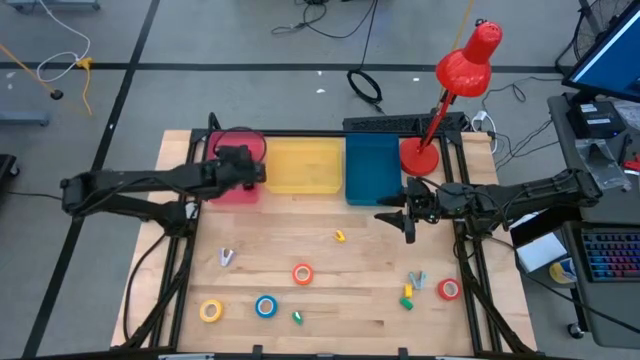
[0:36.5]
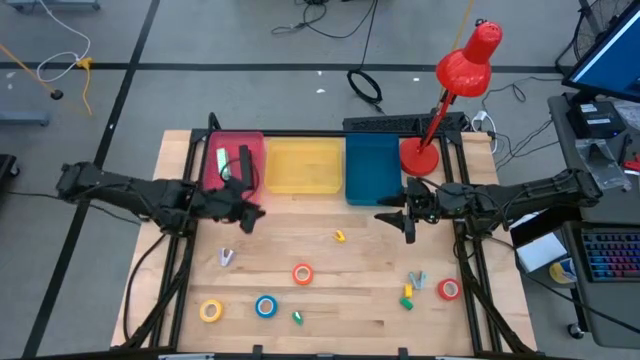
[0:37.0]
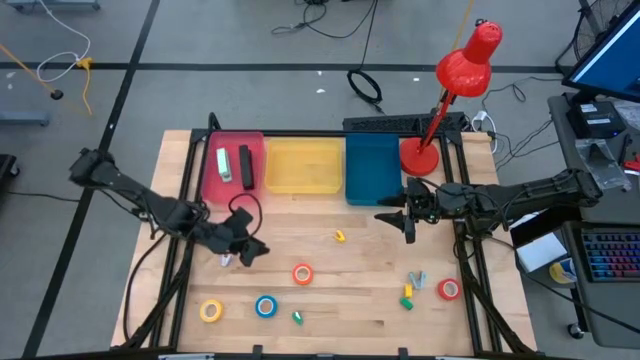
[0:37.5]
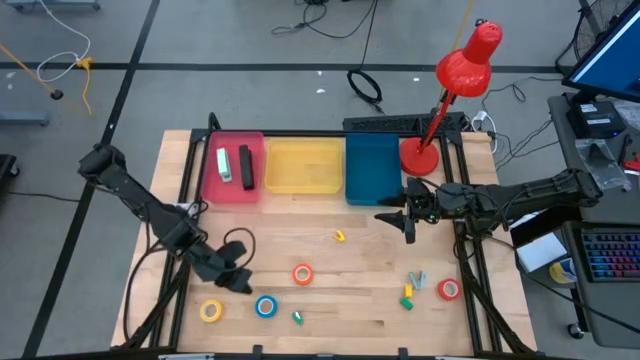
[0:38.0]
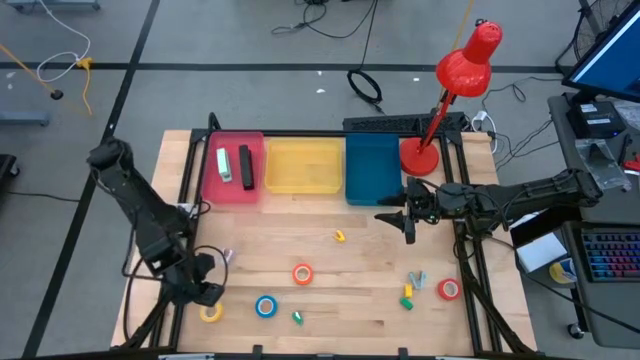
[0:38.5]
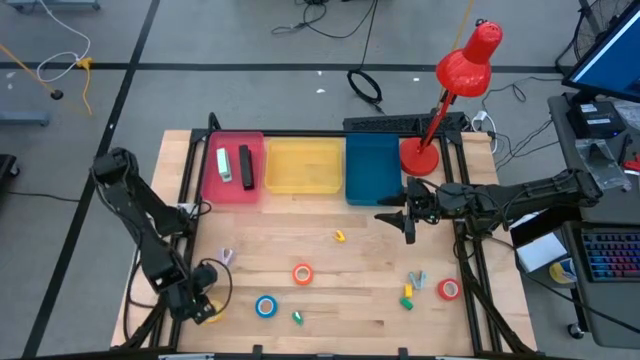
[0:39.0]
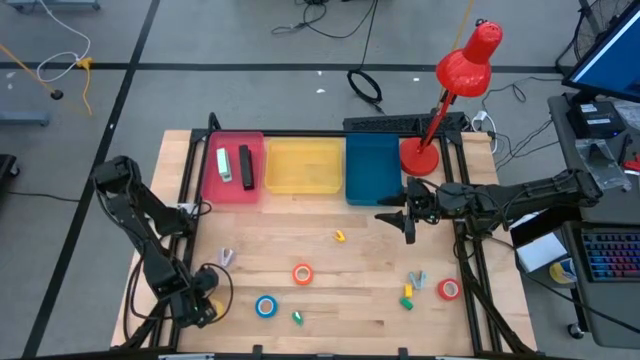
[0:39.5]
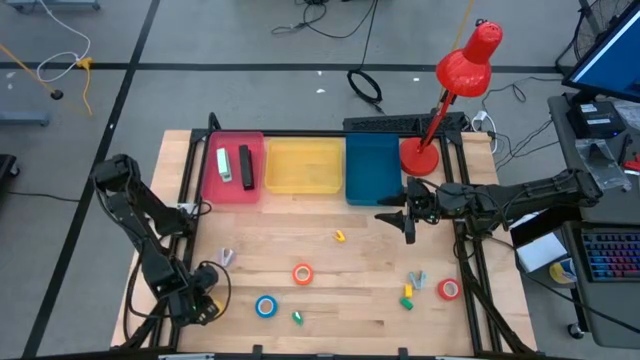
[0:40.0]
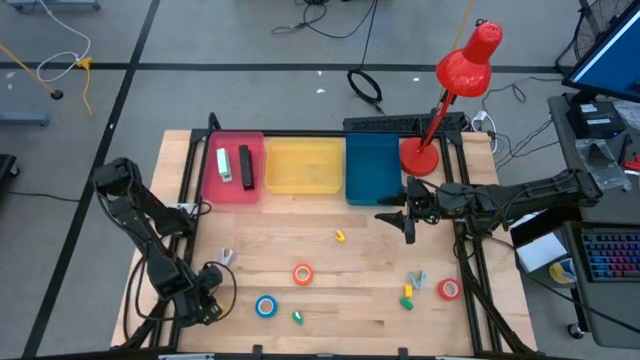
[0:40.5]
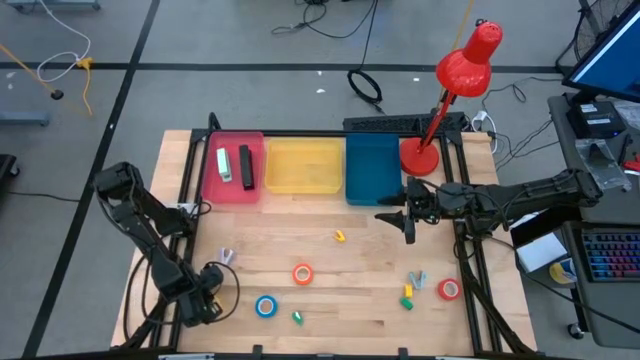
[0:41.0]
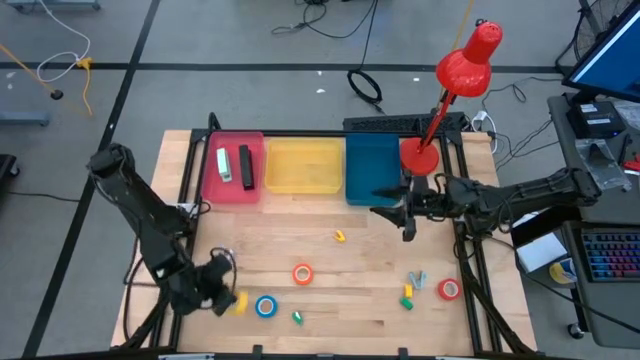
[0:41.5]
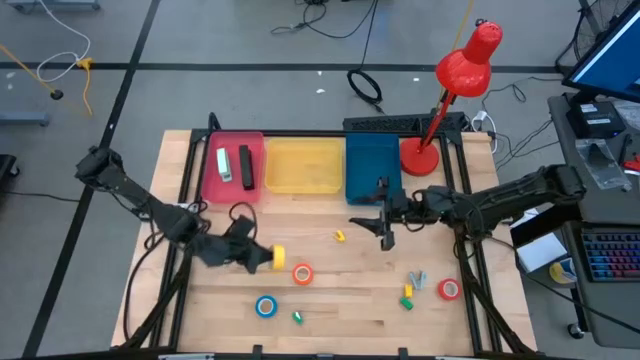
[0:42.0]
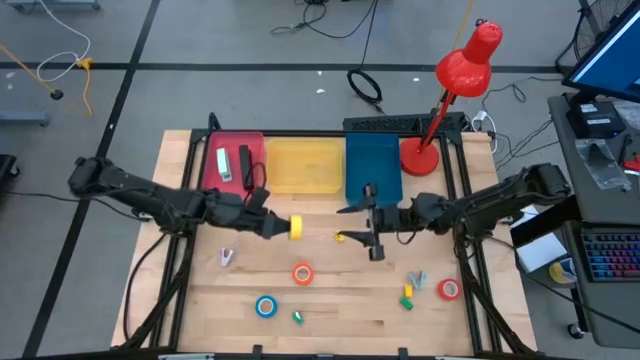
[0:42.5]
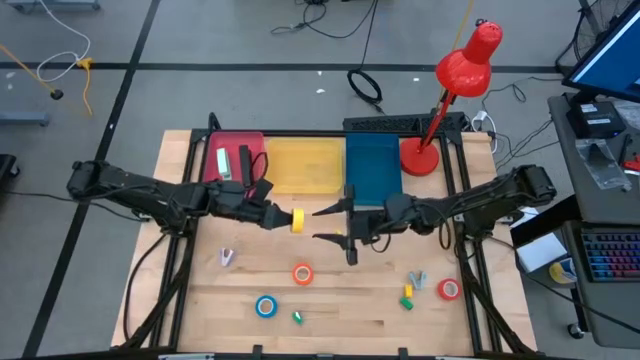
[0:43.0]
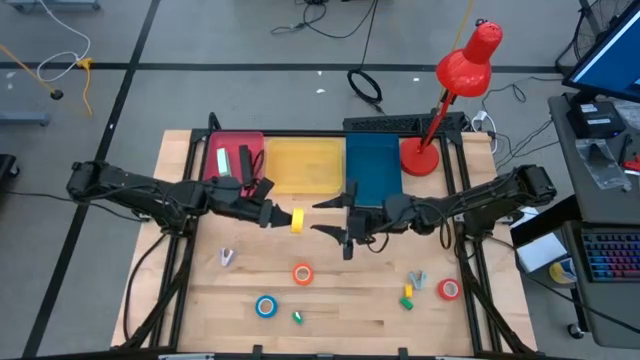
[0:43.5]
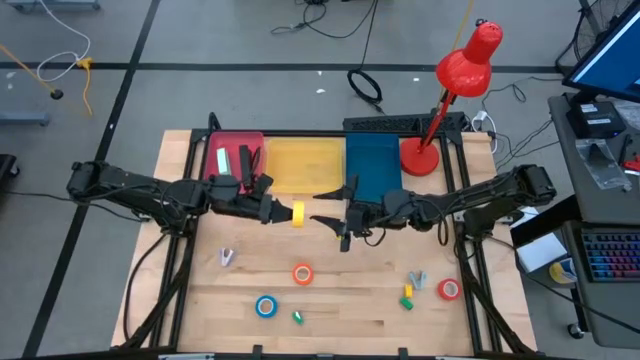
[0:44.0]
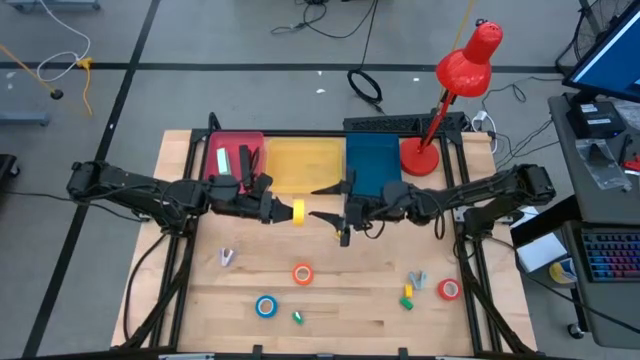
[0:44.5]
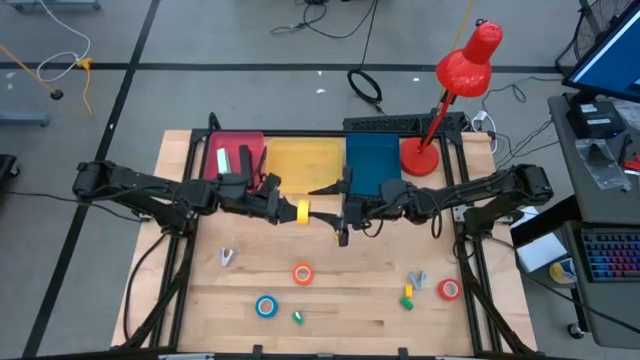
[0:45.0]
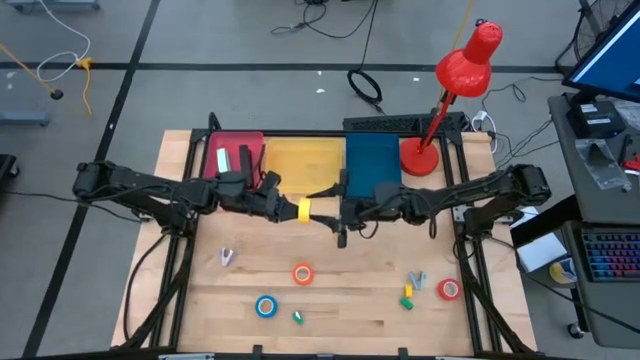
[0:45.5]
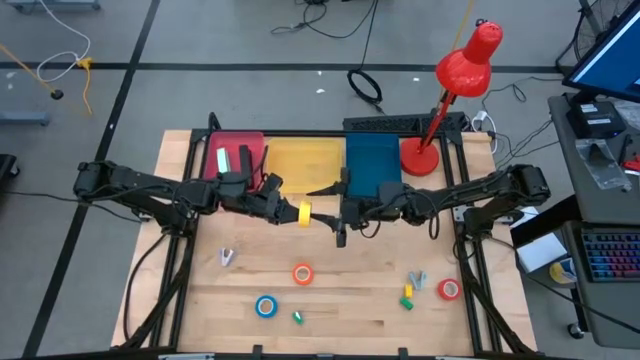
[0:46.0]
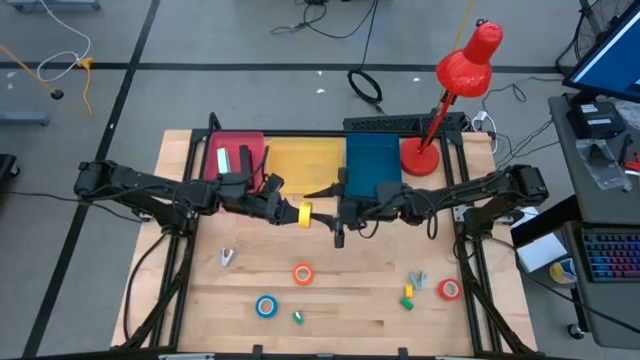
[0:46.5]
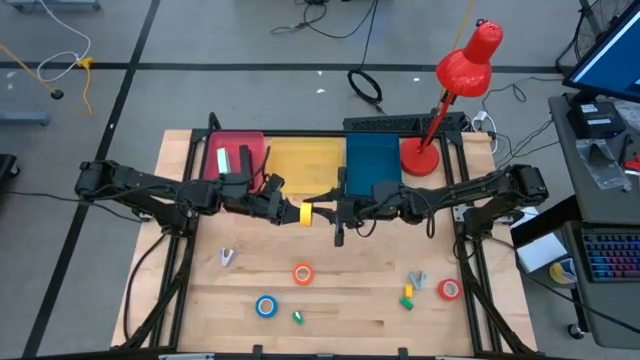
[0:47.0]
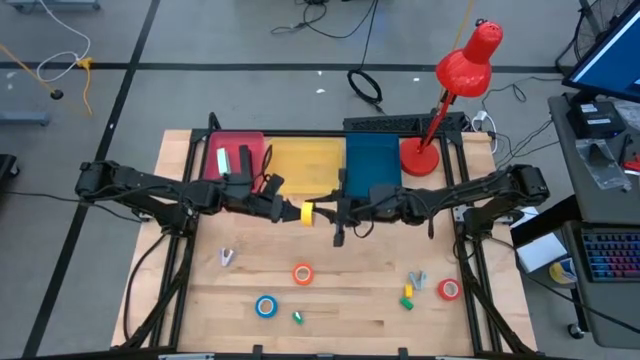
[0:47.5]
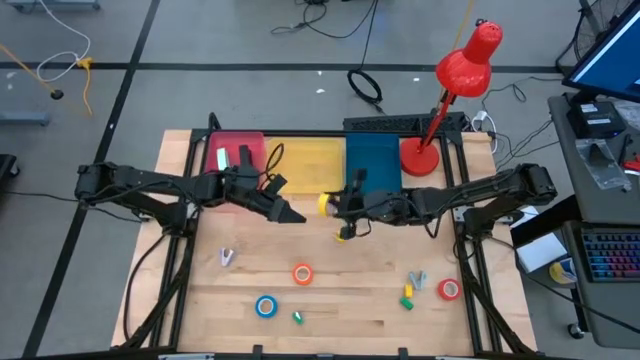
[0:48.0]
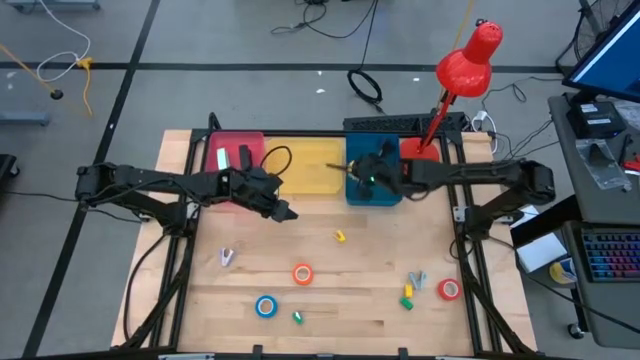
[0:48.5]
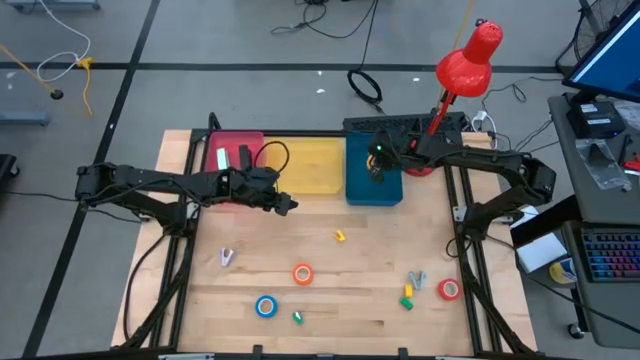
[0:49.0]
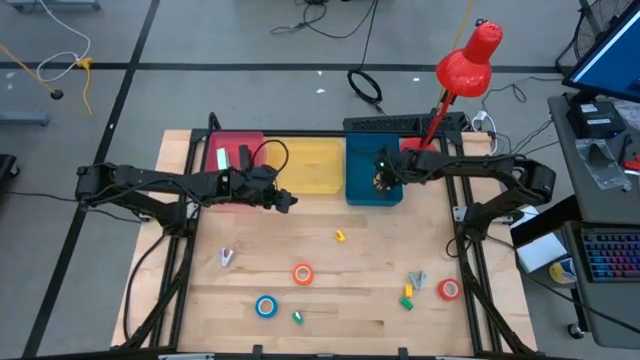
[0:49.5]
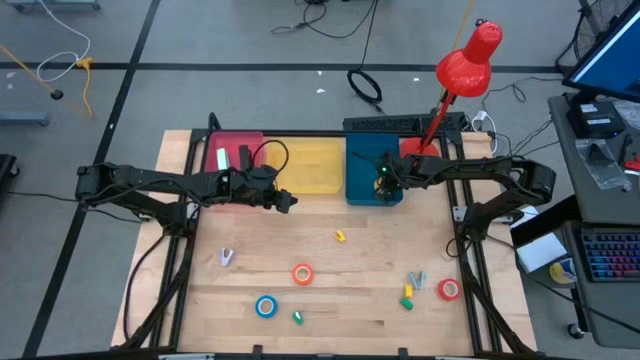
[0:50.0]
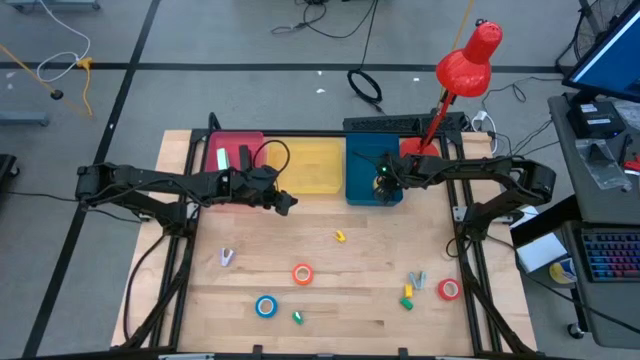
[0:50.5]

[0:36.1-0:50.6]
Task: Pick and place Stapler, Stapler remover, tape
Put the yellow tape into the blue bin

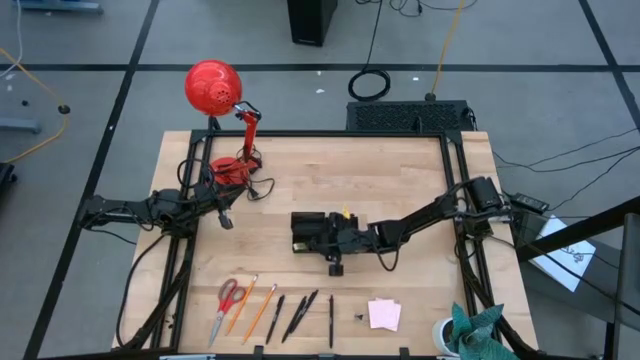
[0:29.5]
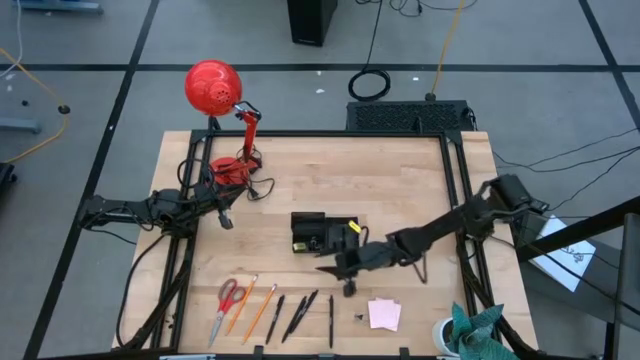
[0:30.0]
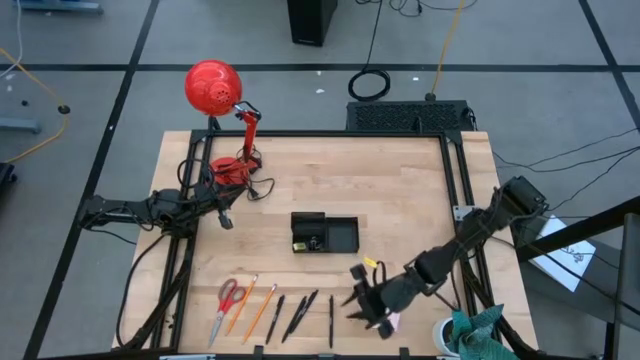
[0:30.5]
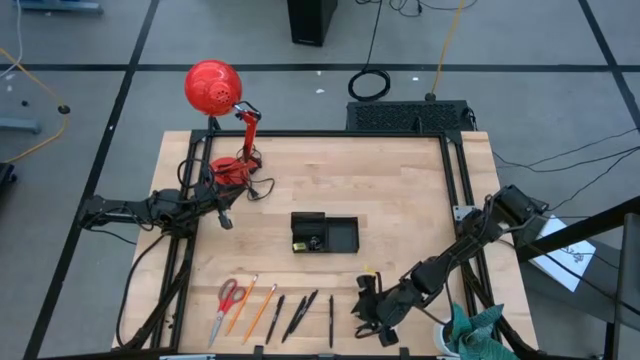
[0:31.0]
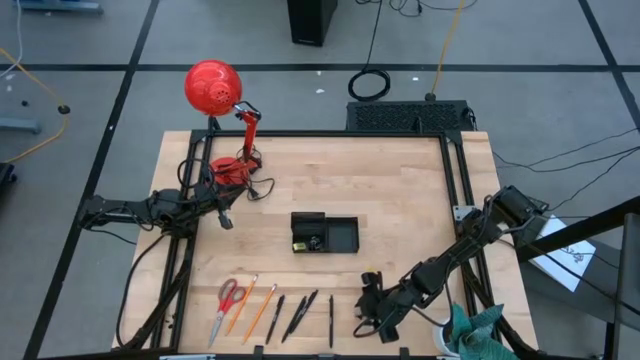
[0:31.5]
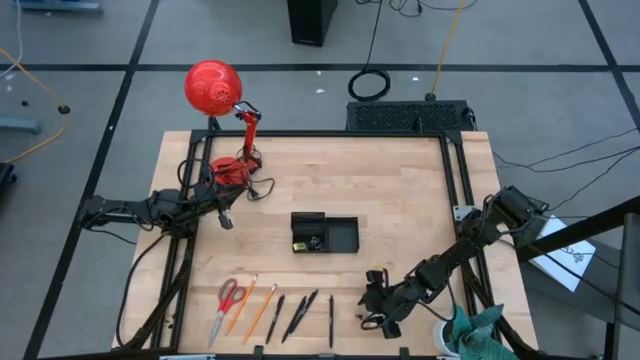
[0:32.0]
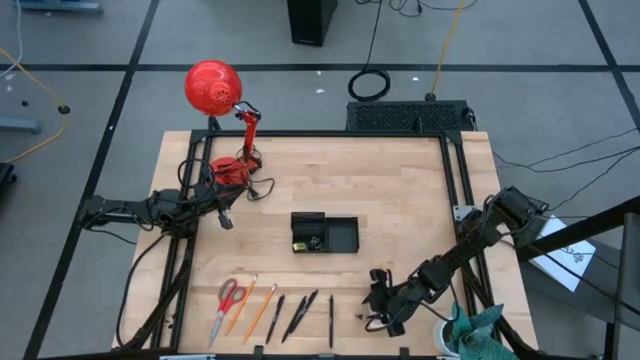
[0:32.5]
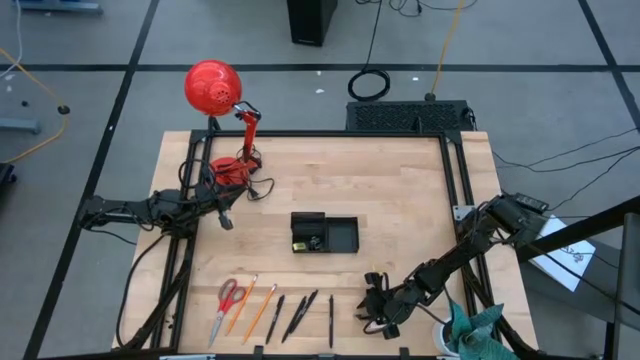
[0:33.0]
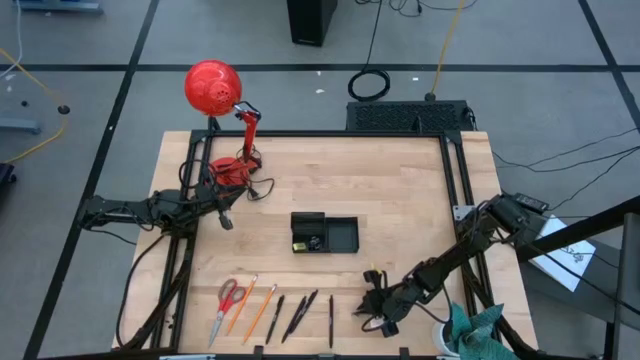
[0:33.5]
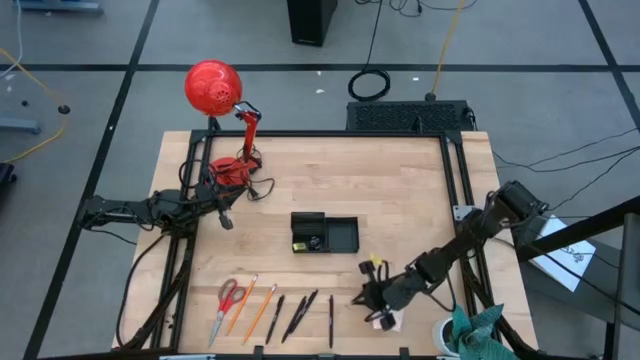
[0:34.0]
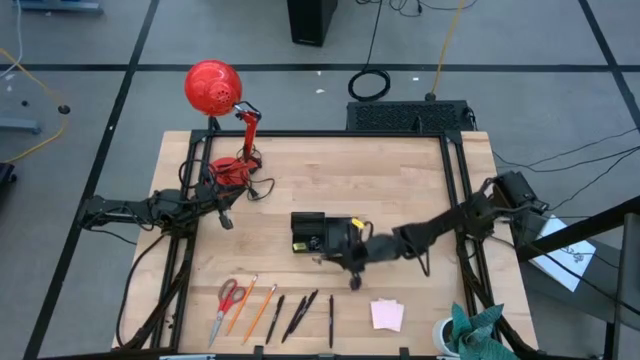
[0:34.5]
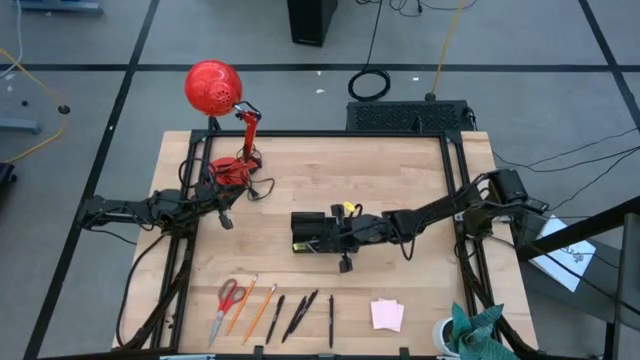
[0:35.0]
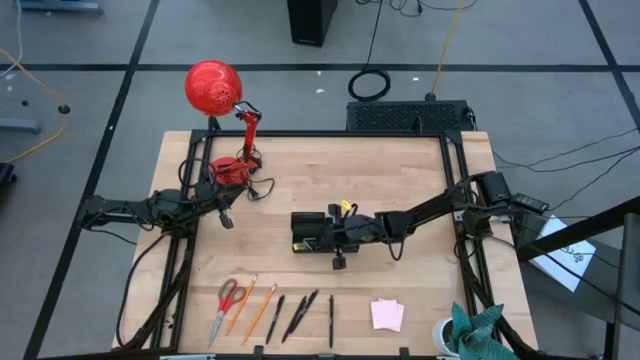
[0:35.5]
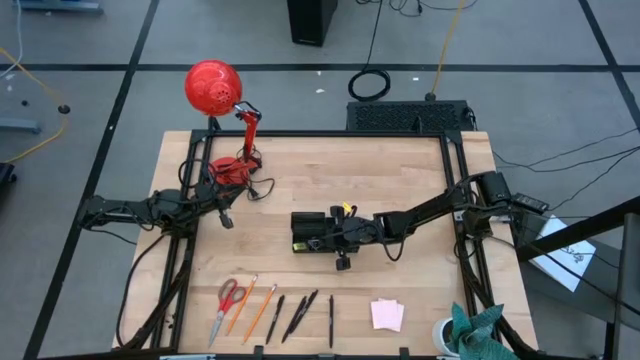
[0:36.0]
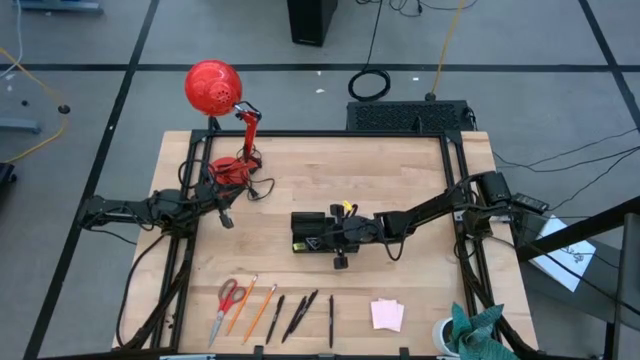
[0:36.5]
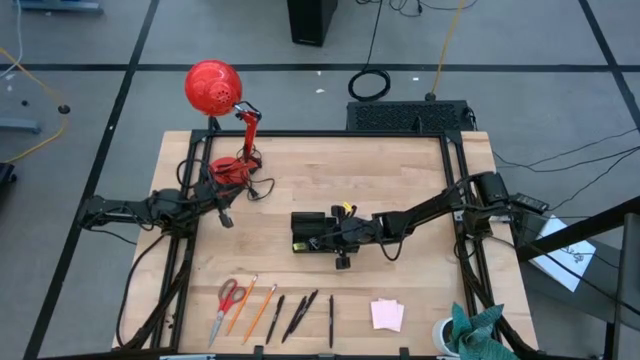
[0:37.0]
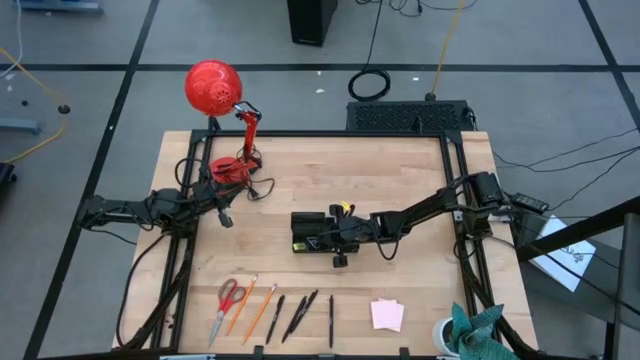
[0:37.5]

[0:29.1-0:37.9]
Task: Pick and place office supplies into organizer
Put the binder clip into the desk organizer
